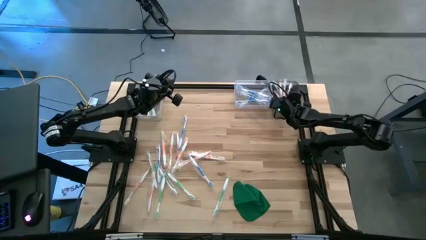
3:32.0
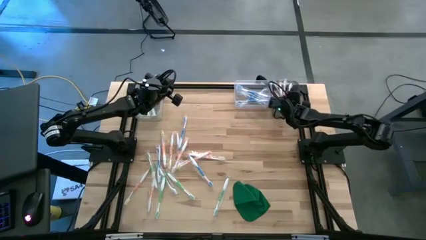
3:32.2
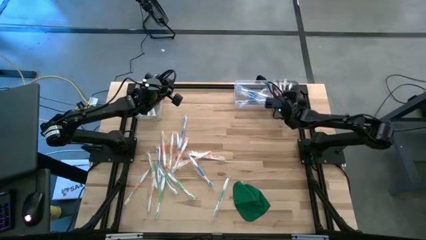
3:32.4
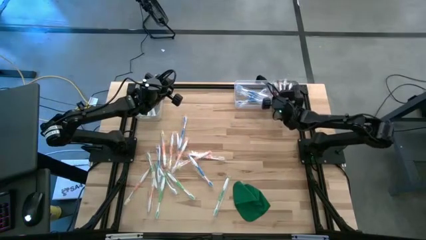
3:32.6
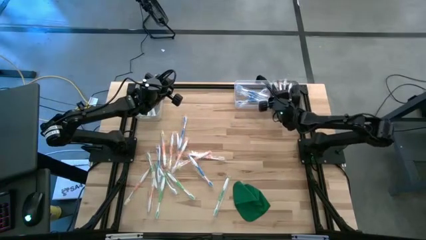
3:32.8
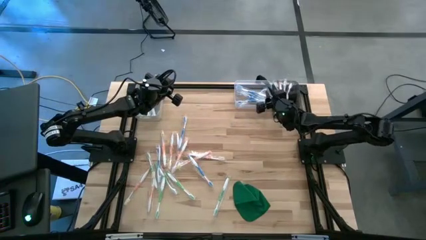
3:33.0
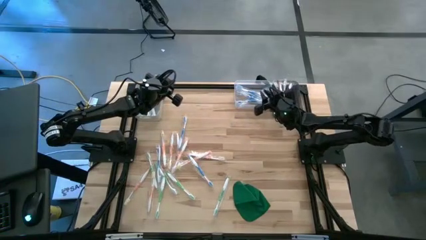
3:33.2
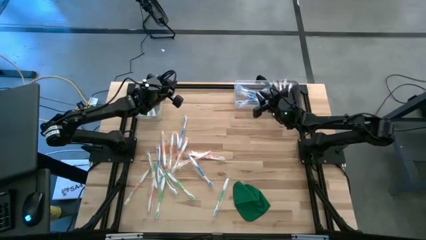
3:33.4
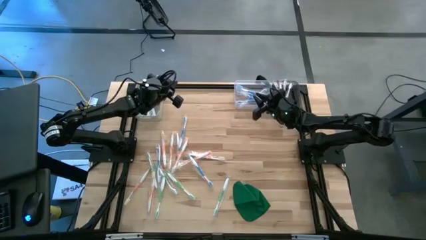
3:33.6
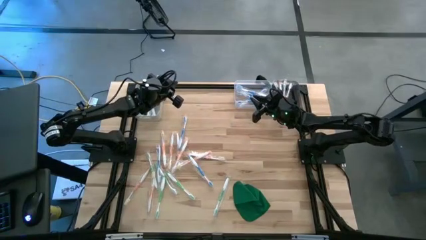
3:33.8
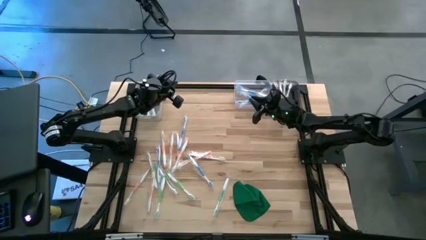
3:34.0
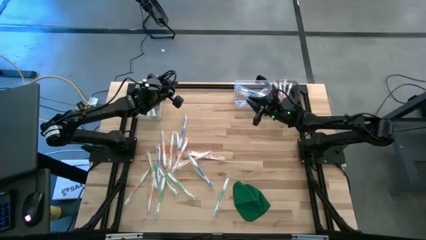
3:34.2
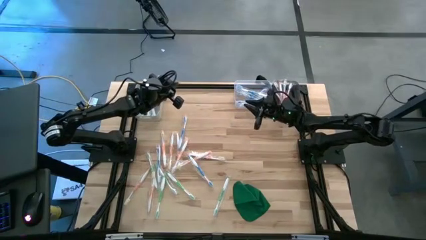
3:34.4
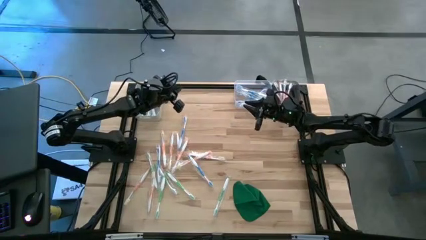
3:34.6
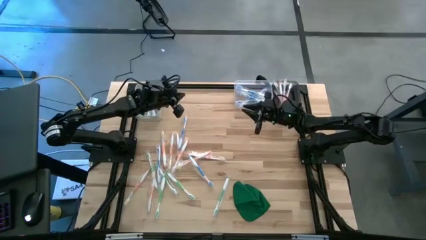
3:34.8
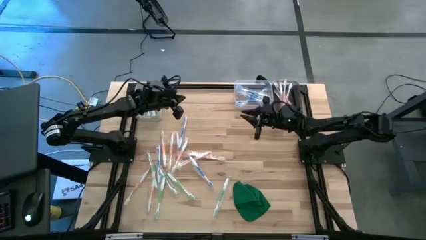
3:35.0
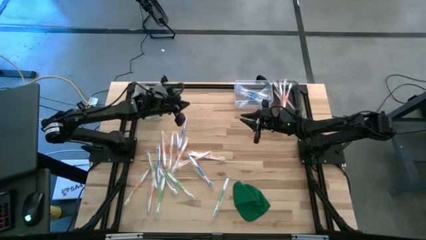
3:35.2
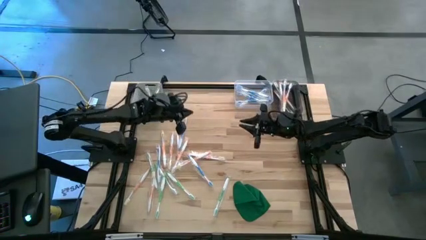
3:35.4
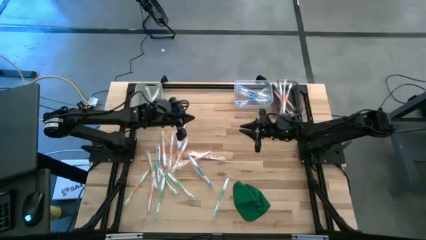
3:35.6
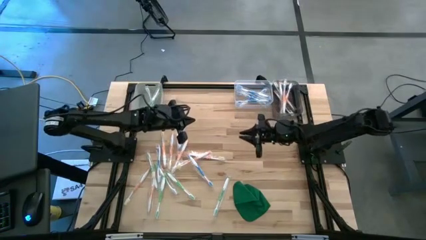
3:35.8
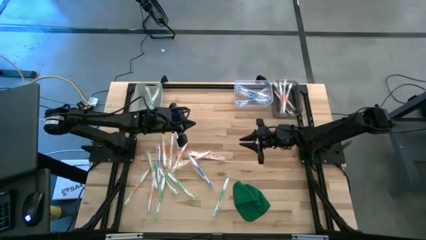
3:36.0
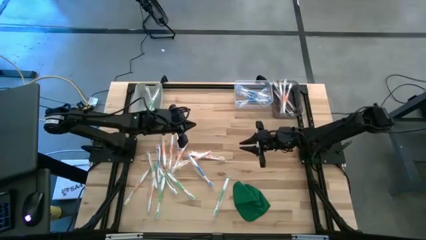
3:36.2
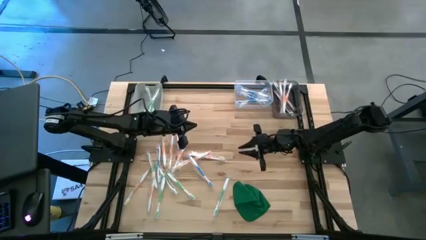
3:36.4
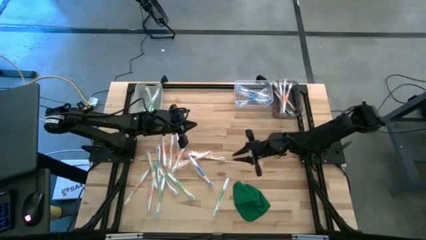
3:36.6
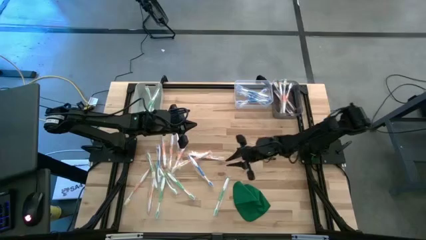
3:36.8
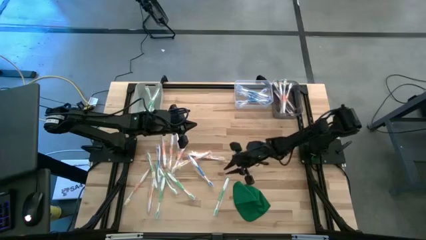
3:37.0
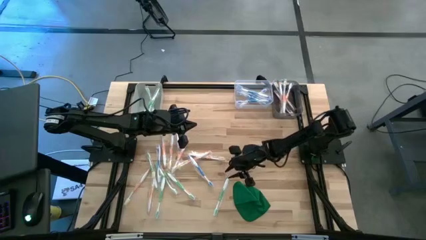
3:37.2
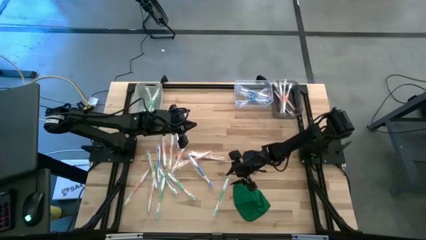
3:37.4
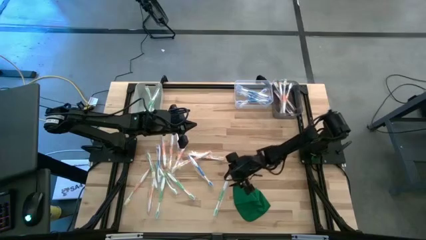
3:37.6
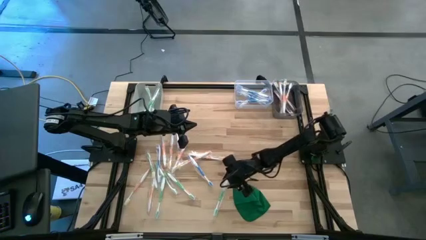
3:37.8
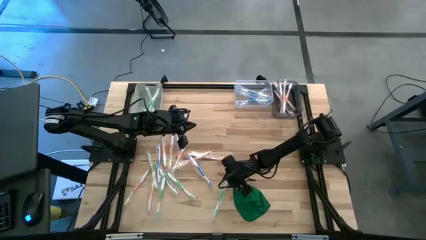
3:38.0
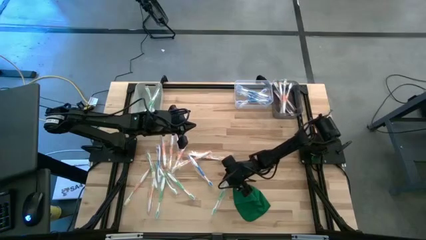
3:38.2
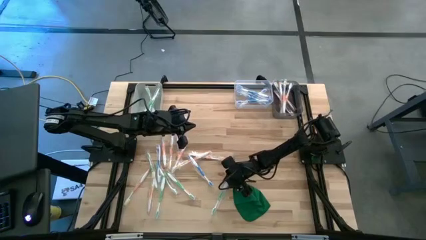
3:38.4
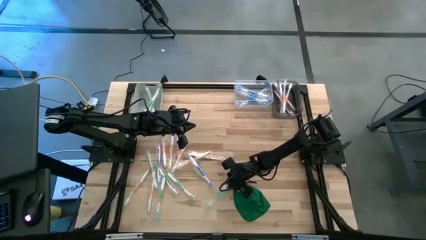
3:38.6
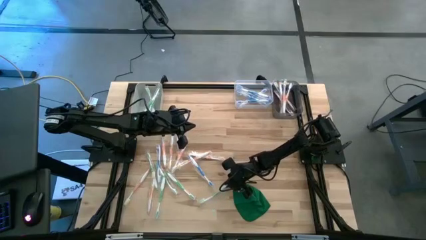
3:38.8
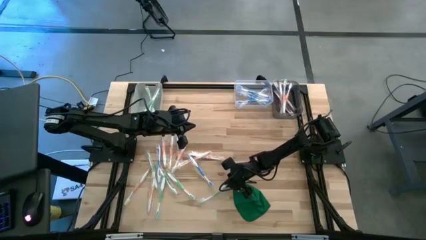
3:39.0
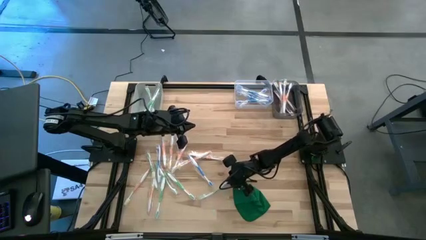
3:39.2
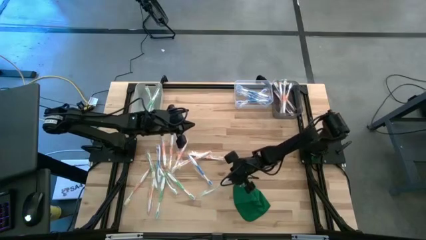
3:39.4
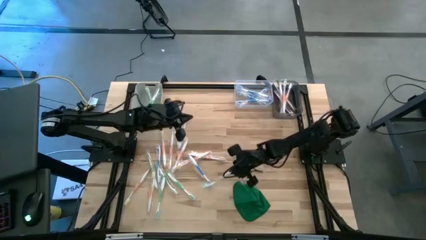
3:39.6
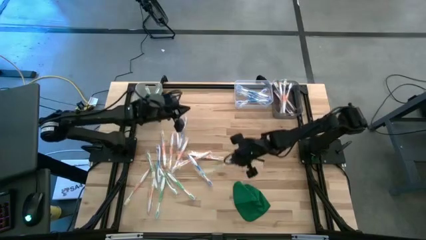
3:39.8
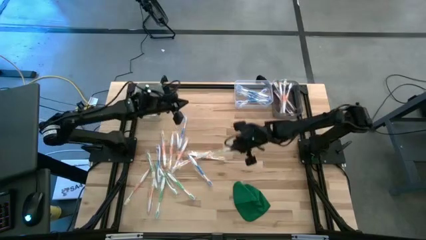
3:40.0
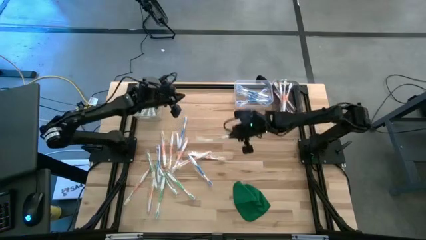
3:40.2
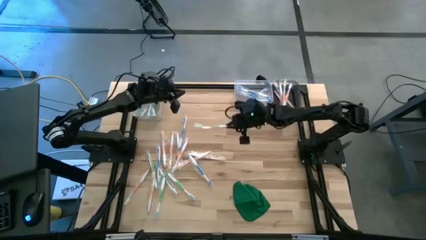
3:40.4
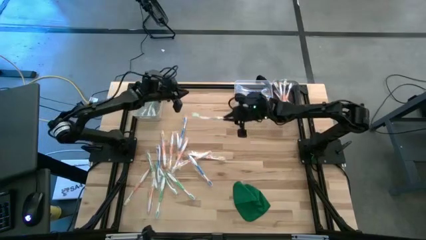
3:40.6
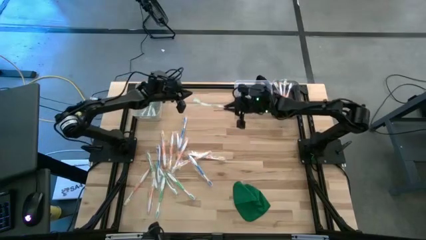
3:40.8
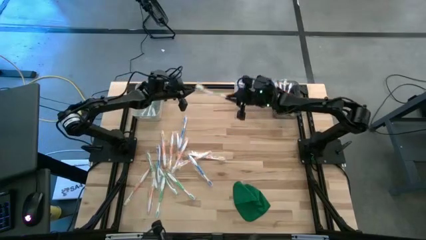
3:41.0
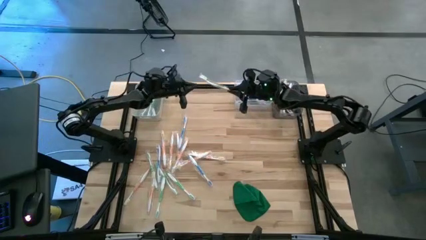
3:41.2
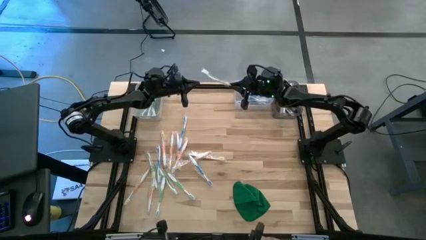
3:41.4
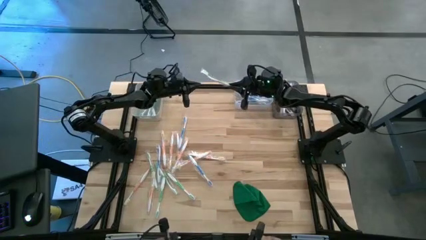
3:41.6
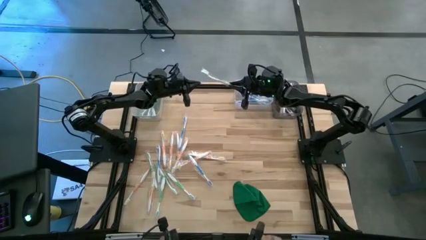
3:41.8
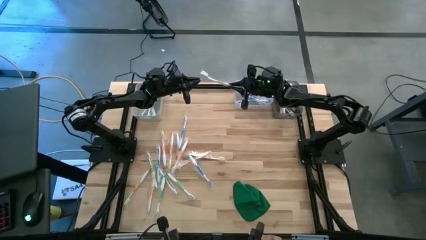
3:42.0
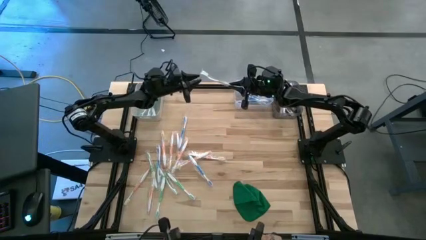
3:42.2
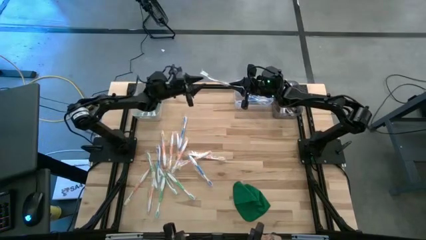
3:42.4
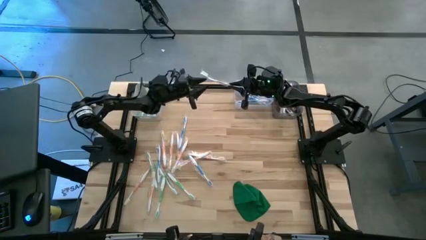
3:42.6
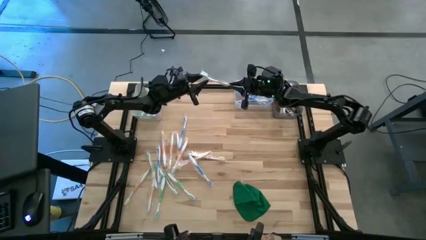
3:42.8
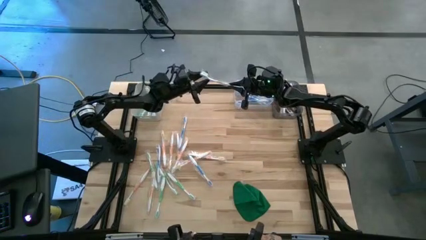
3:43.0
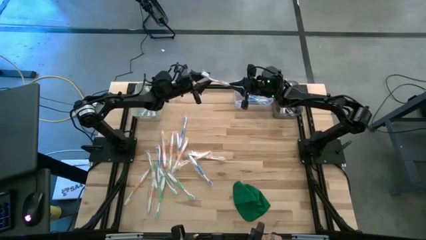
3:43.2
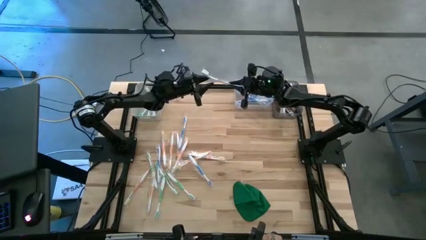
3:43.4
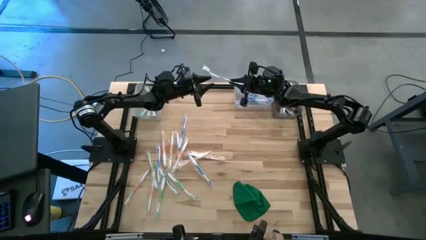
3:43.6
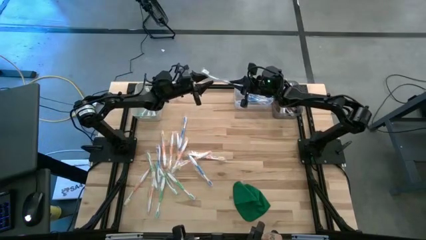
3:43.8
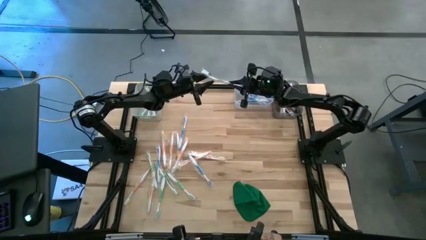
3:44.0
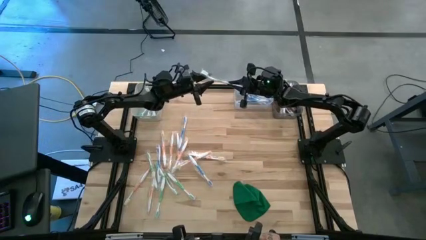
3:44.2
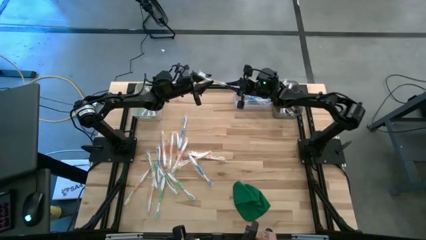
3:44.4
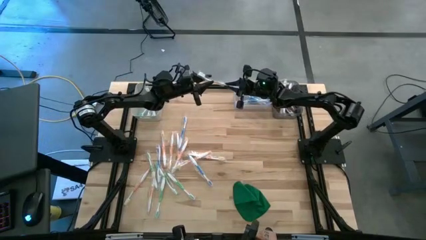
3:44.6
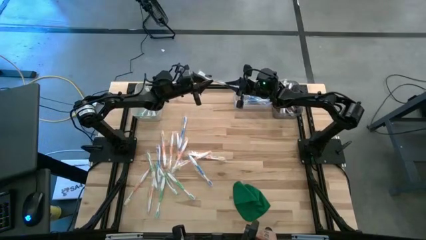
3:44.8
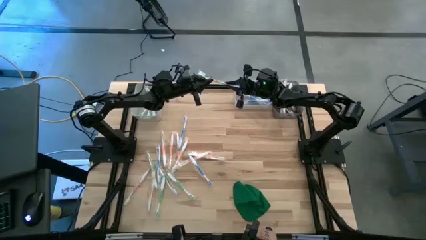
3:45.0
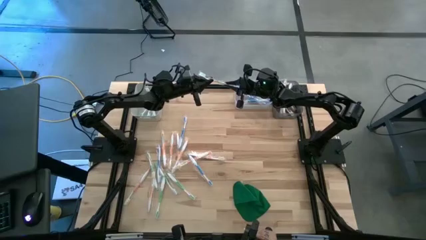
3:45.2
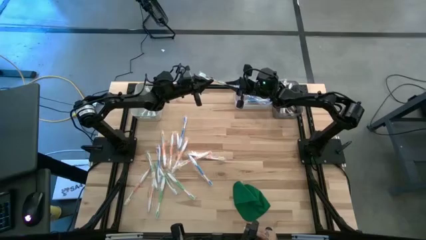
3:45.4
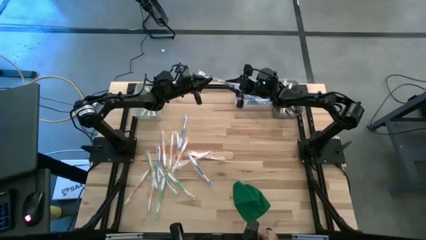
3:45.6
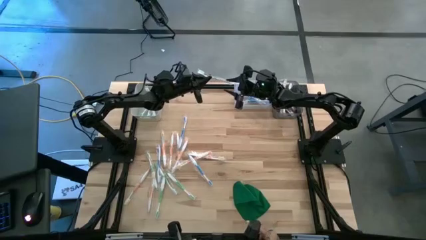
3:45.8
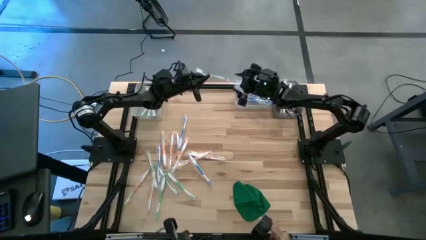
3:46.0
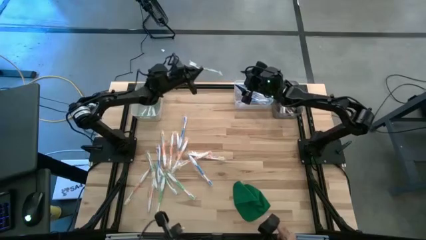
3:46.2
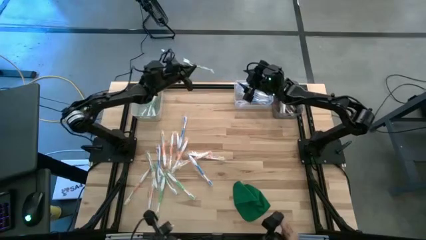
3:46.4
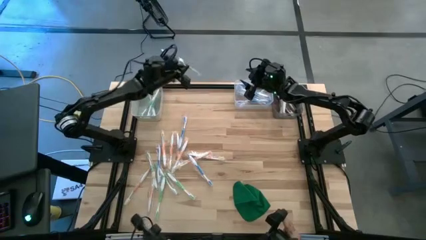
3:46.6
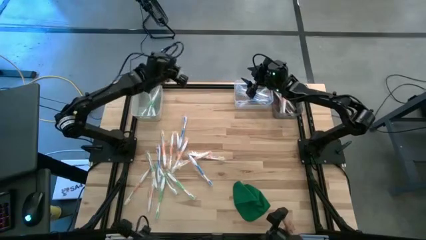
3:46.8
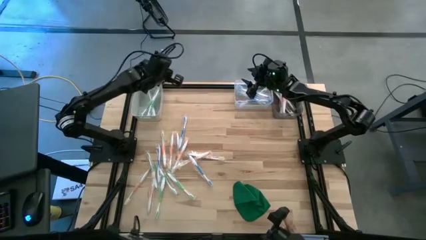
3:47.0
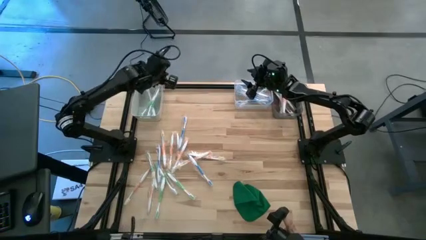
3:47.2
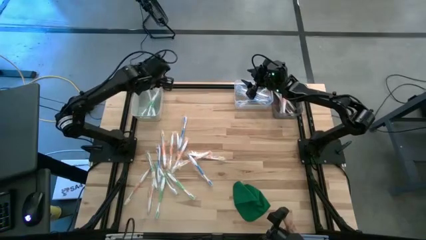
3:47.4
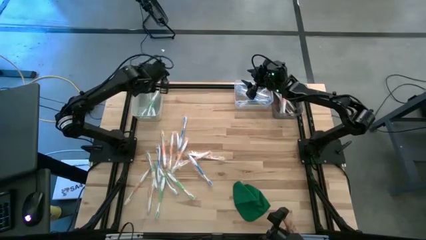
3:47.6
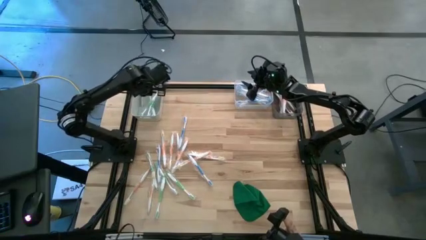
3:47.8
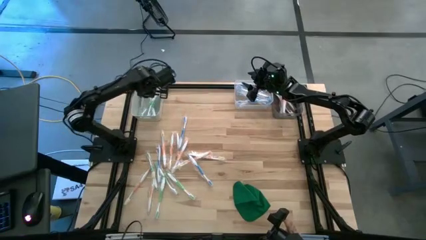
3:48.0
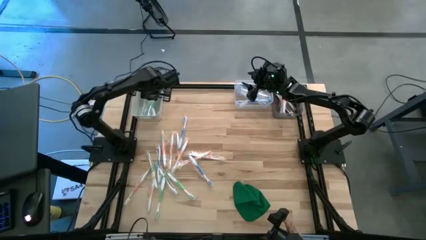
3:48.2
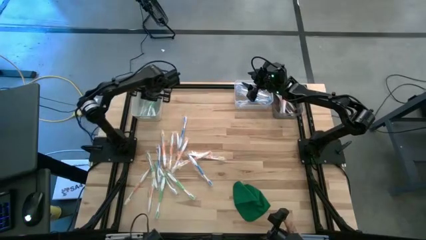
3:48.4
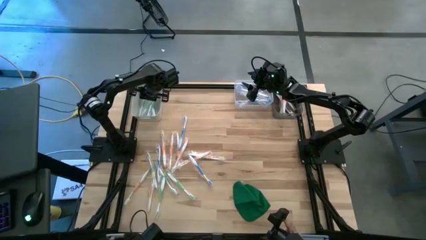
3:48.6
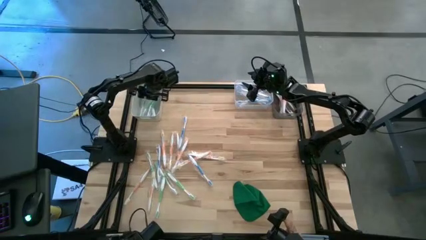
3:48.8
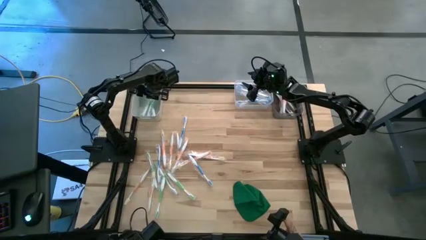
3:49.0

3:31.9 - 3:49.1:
Task: Pick & Place Toothbrushes
Put the green toothbrush into the gray bin
